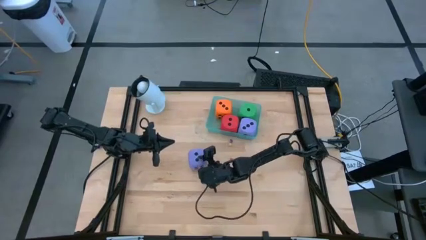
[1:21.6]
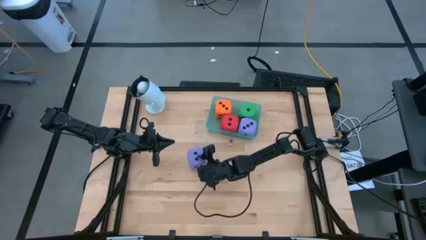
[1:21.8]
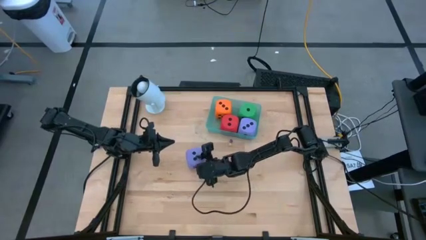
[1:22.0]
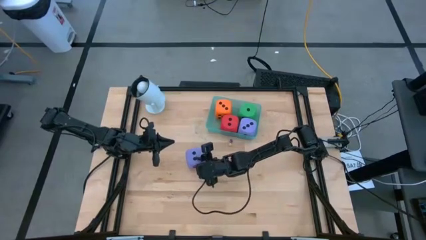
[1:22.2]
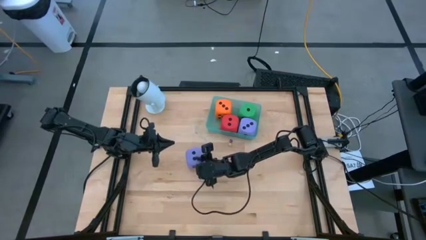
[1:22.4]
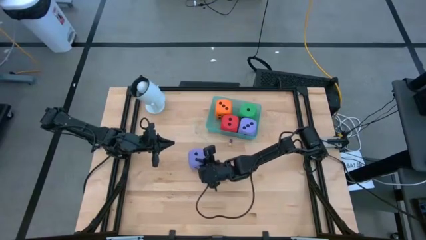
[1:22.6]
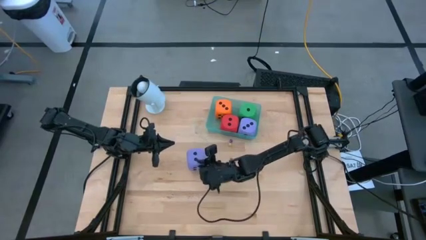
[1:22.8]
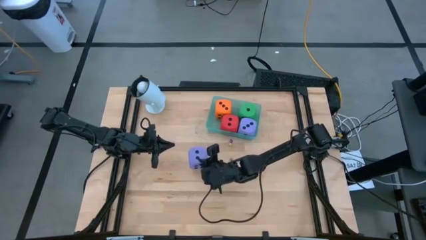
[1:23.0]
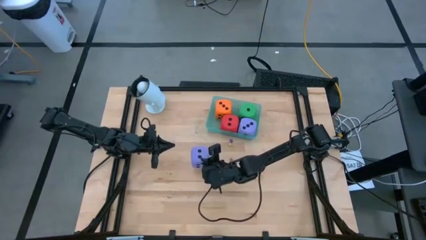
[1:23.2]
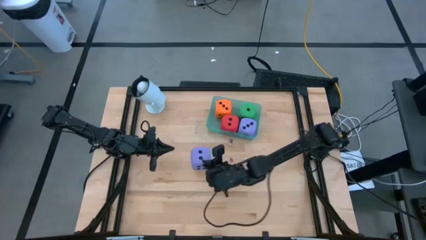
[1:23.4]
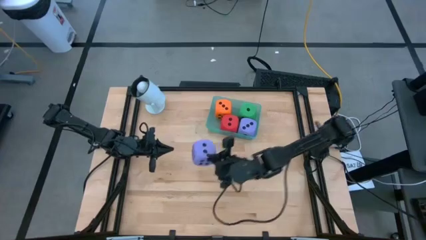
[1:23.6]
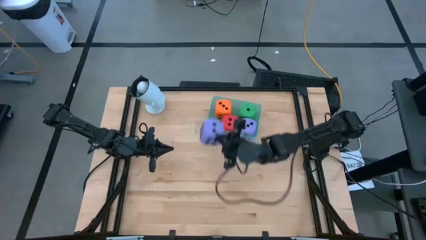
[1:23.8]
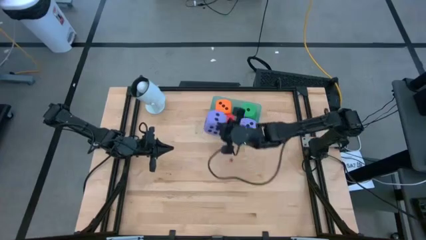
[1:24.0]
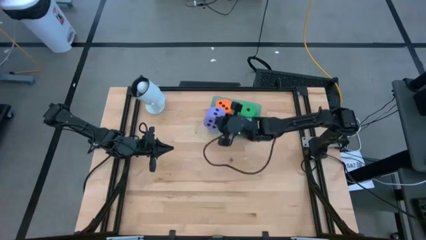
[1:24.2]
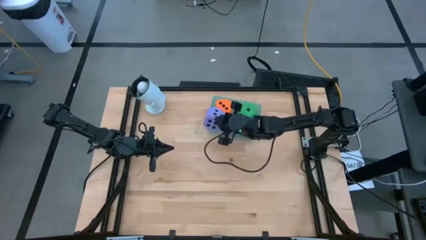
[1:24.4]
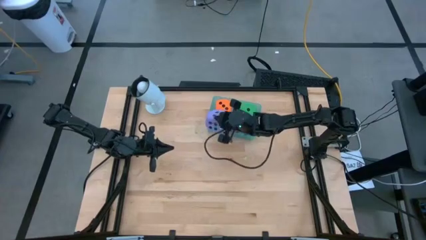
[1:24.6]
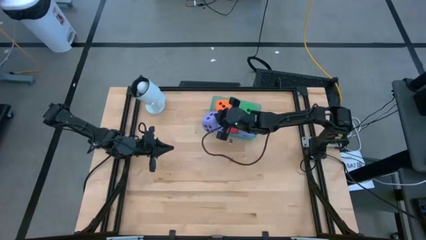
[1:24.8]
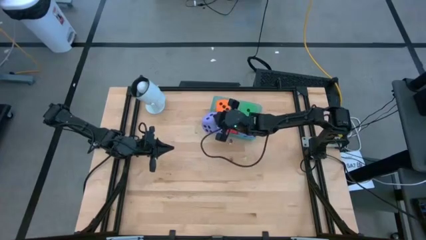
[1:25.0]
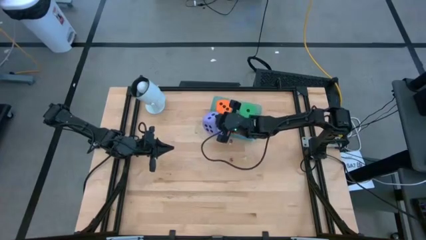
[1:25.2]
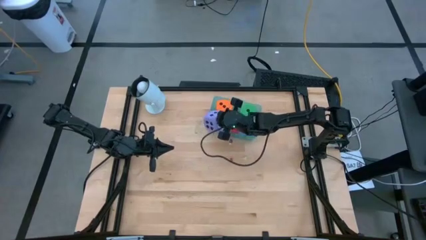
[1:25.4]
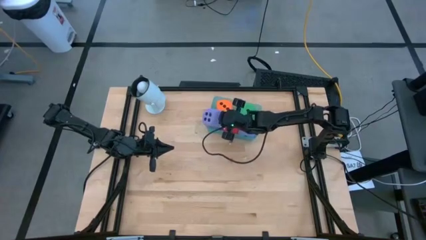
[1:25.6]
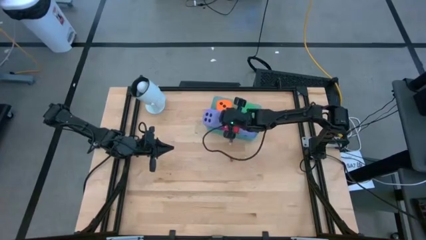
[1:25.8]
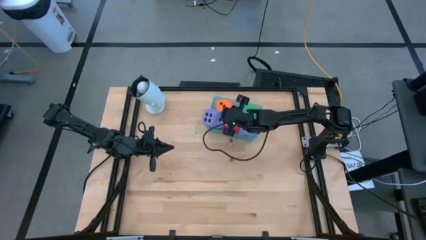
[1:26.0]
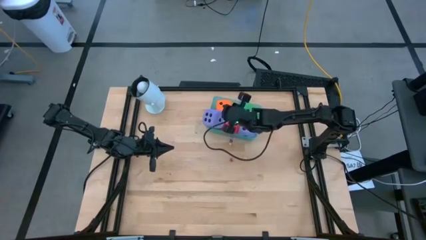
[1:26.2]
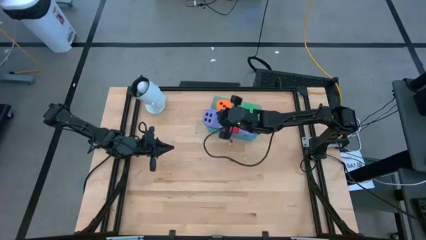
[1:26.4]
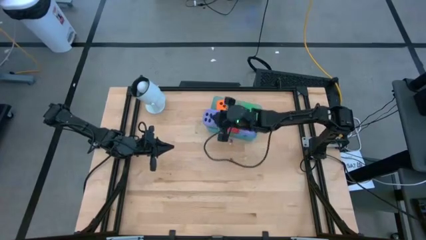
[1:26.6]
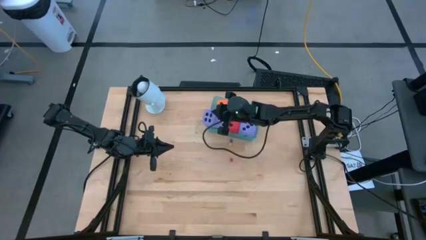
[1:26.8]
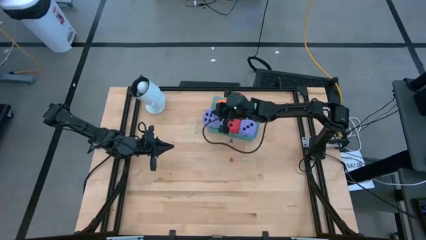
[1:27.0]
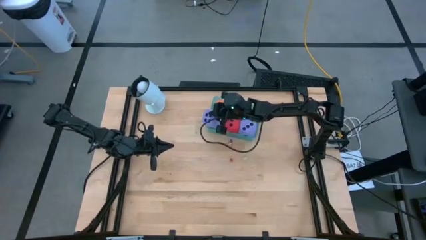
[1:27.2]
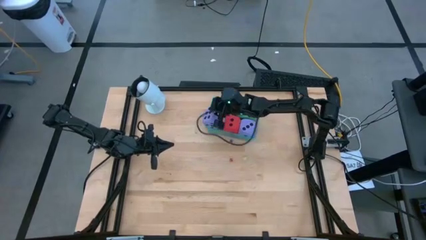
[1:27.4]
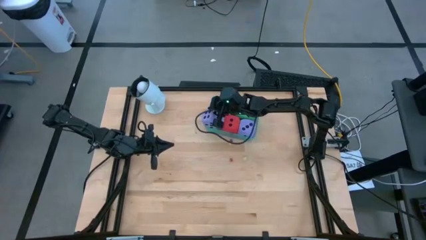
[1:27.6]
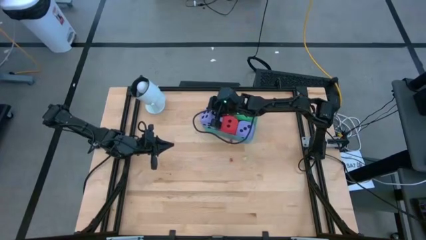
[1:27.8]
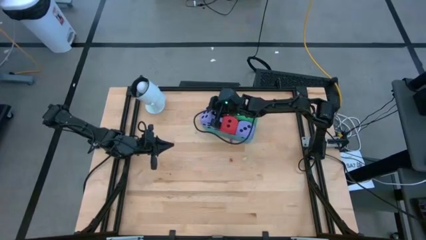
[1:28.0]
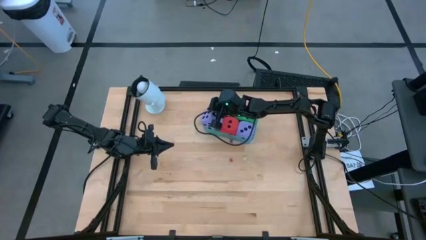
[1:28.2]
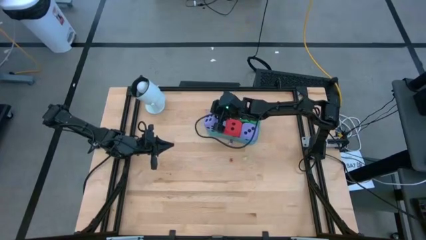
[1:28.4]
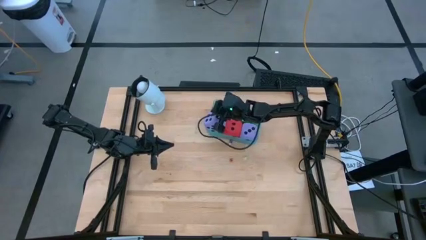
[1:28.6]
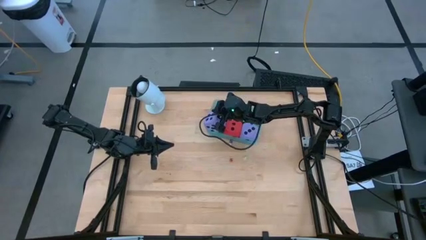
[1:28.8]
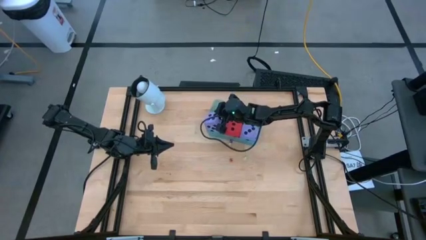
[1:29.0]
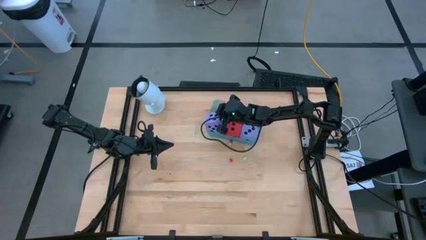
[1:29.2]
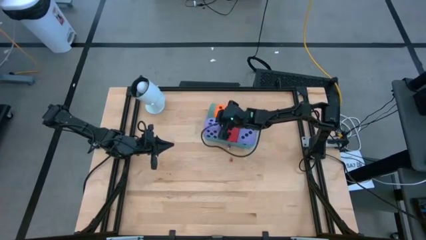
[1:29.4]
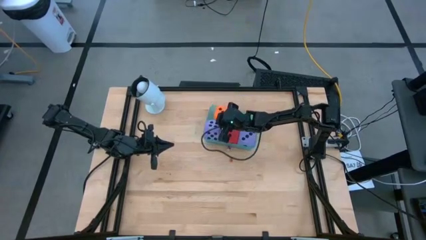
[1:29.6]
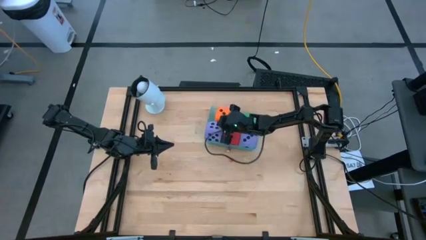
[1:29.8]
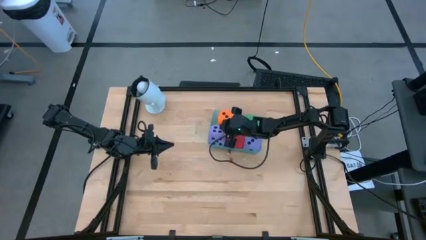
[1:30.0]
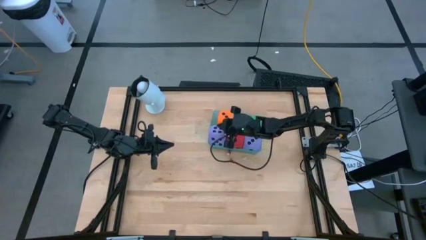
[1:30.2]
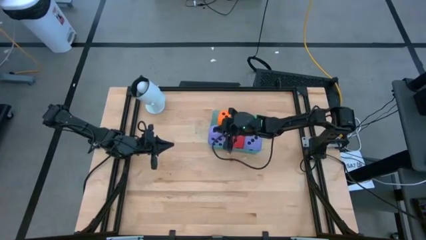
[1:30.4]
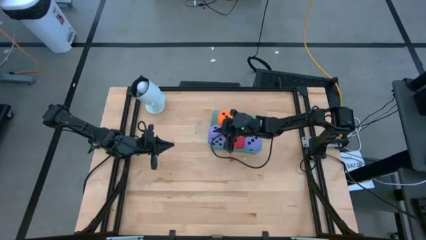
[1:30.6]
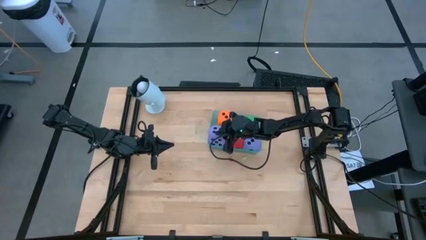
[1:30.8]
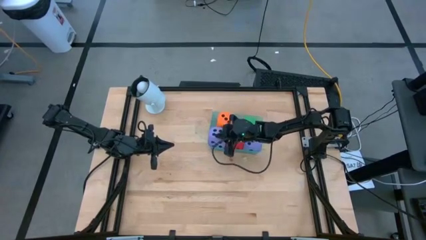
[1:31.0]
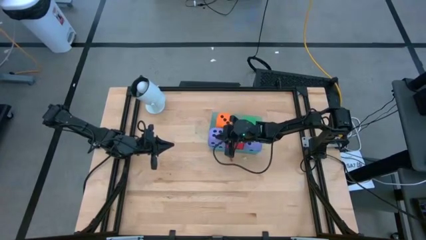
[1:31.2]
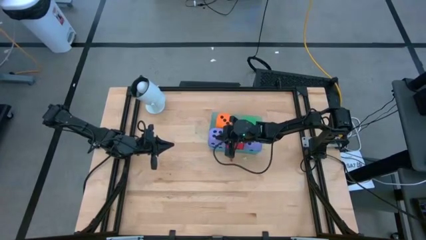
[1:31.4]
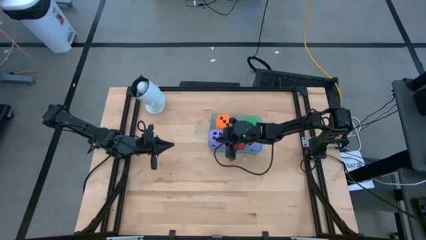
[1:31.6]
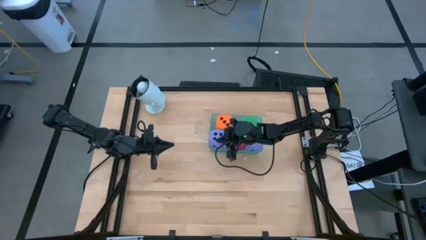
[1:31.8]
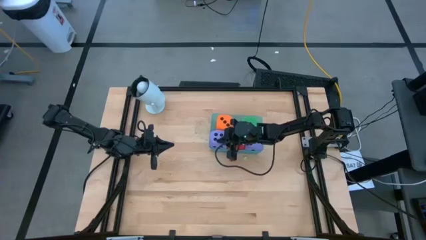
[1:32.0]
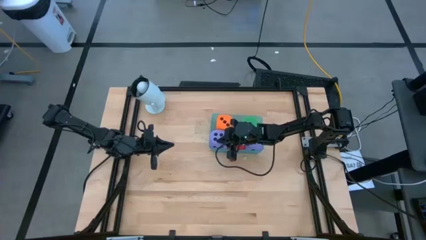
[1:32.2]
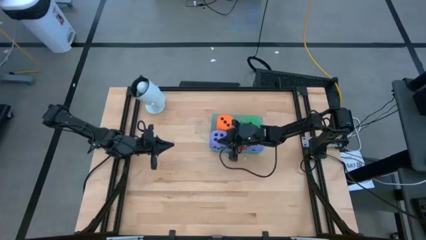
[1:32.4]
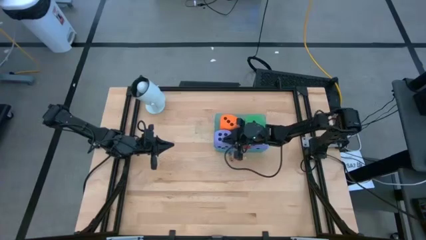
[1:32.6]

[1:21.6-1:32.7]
Task: Pick & Place Dice
Put the large purple die into the blue bin

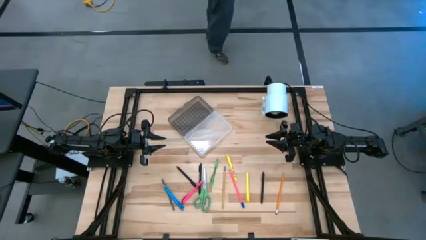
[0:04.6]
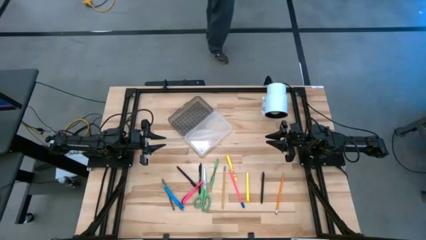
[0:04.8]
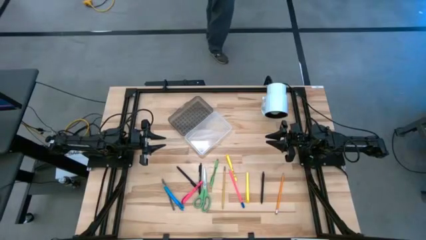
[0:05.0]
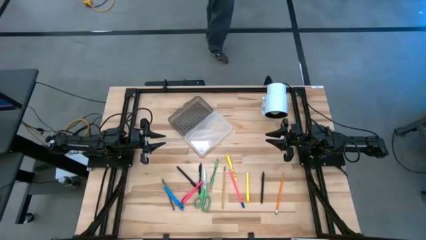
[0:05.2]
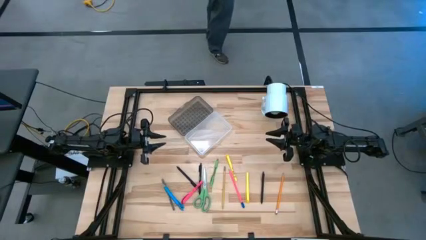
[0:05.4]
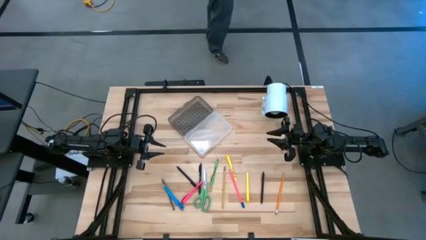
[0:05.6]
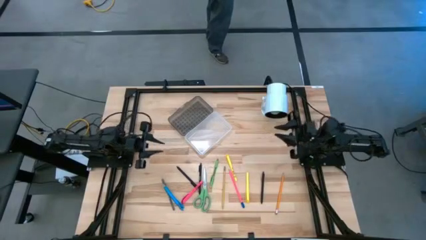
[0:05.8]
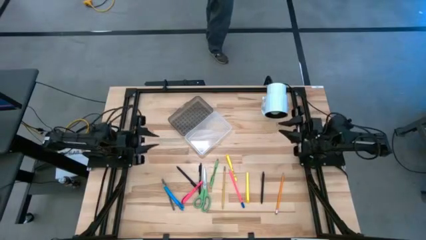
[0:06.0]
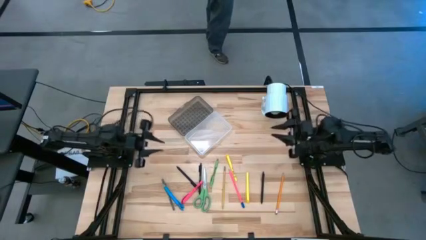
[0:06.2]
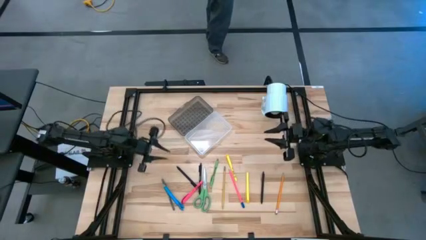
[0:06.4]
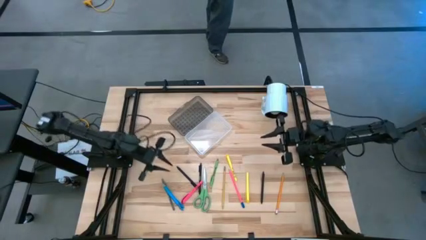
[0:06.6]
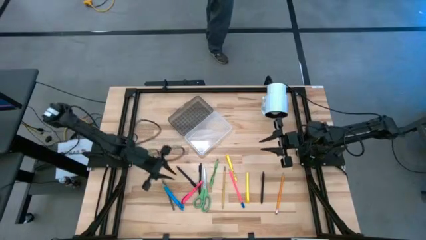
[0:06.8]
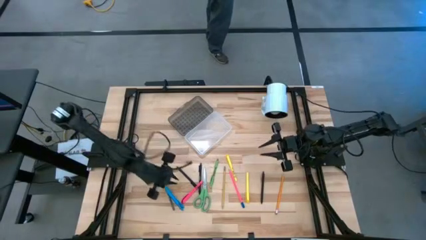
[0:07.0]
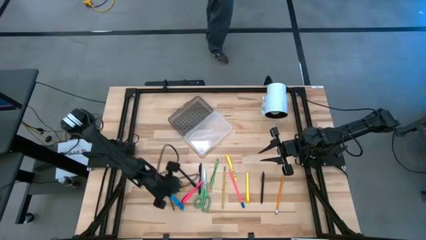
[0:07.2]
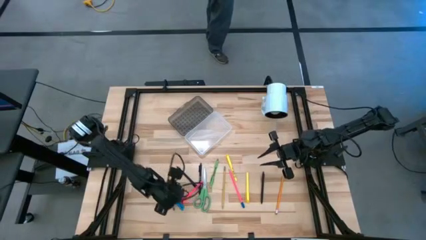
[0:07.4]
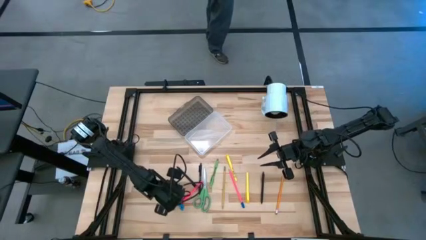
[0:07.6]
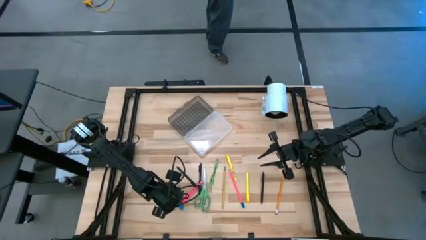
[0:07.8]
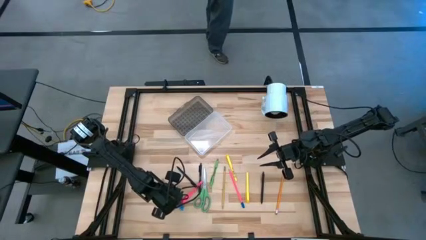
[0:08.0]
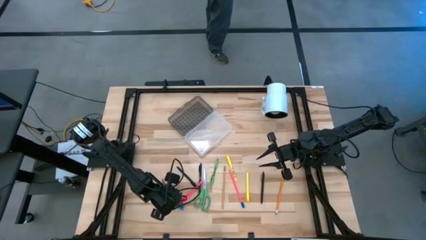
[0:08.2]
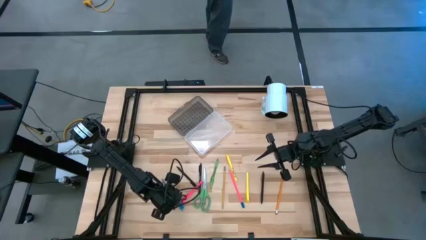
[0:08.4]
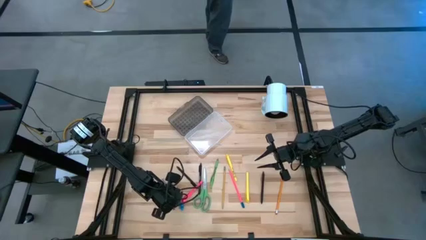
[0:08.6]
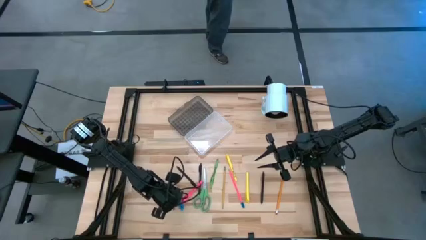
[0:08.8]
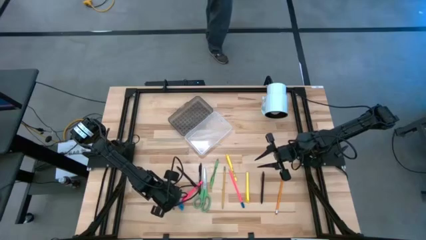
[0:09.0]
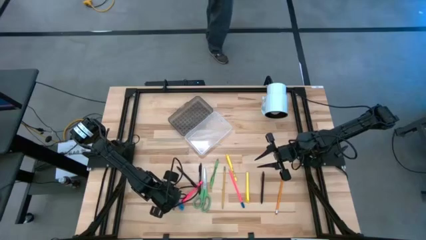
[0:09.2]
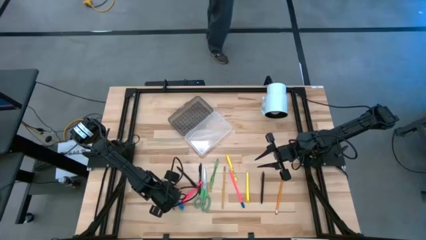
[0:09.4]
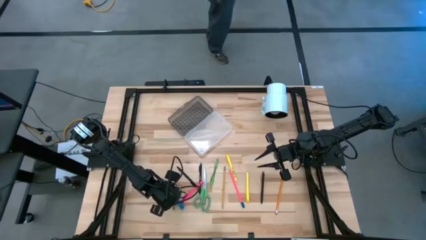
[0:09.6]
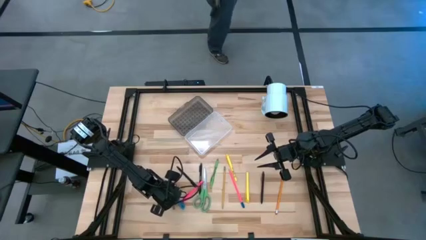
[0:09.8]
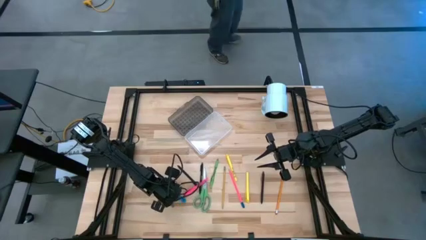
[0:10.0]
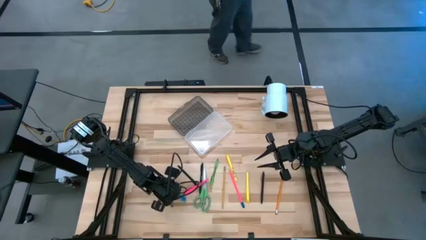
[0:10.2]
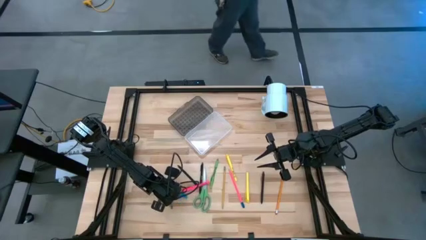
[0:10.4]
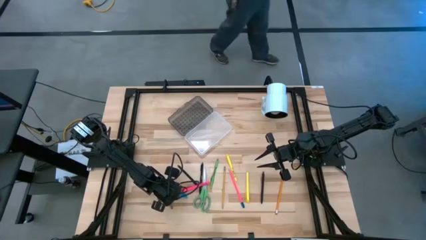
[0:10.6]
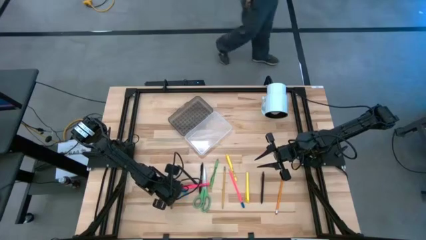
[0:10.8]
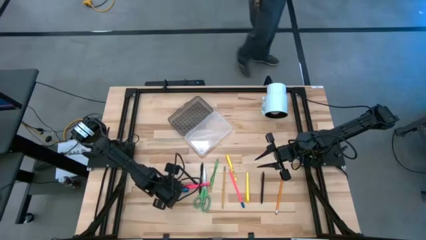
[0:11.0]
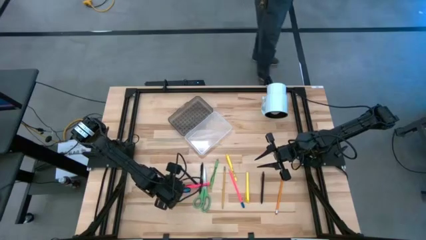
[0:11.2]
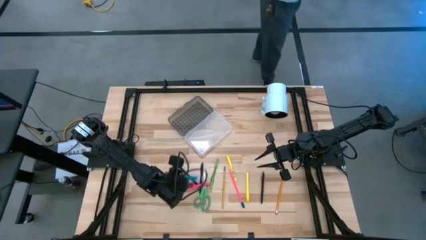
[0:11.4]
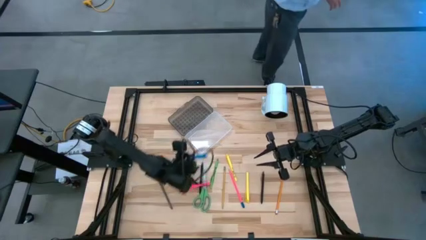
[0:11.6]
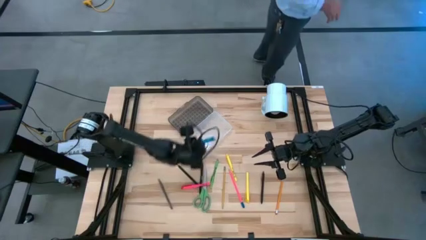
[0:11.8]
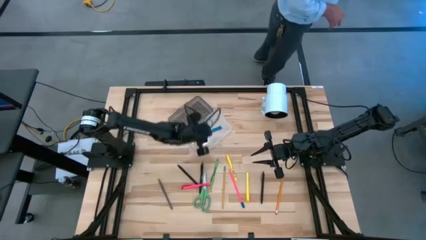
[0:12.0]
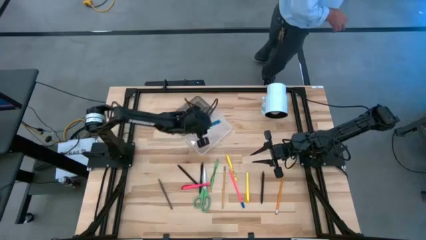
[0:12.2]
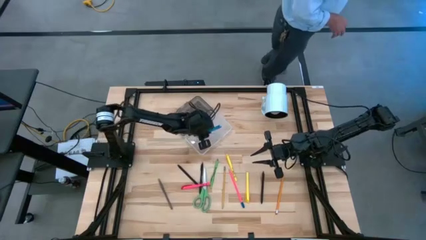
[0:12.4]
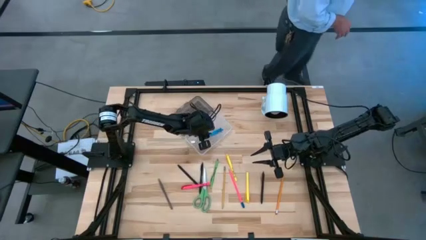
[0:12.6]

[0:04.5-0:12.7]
Task: Pick & place school supplies into a supply box
Put the blue pen into the transparent supply box
